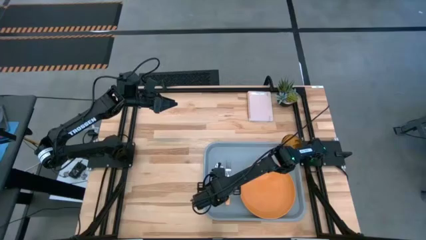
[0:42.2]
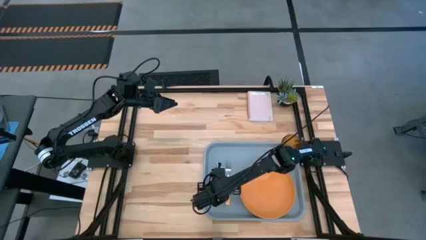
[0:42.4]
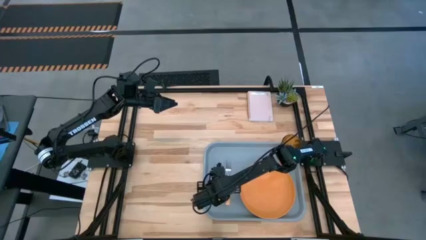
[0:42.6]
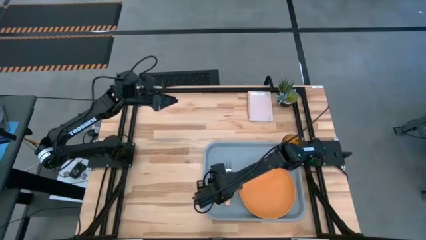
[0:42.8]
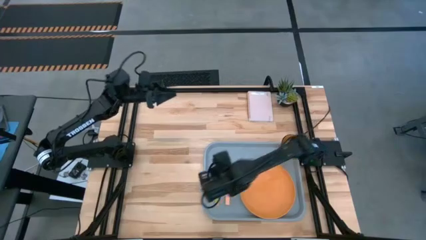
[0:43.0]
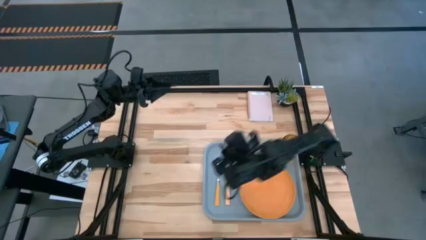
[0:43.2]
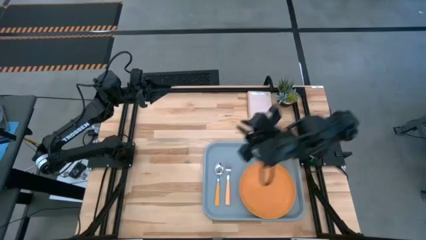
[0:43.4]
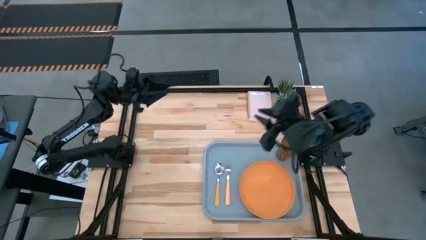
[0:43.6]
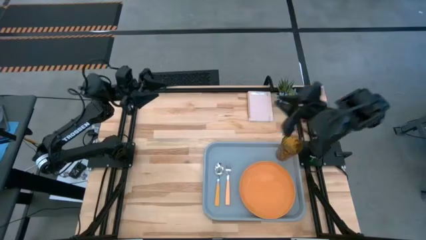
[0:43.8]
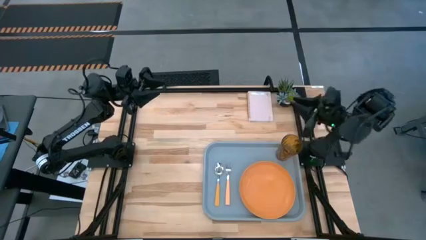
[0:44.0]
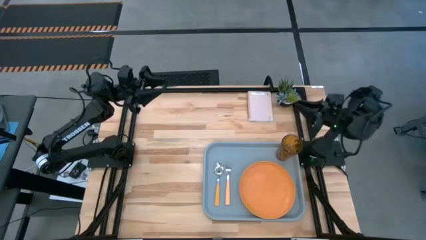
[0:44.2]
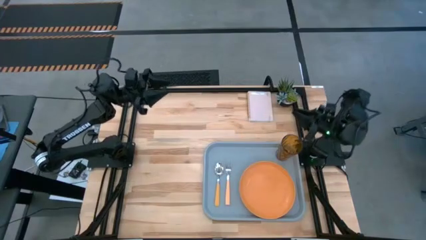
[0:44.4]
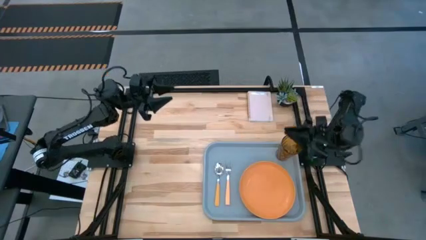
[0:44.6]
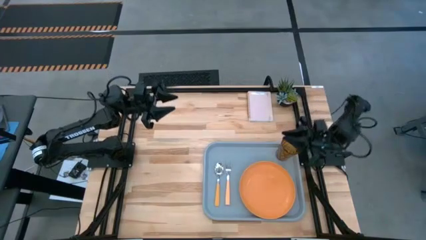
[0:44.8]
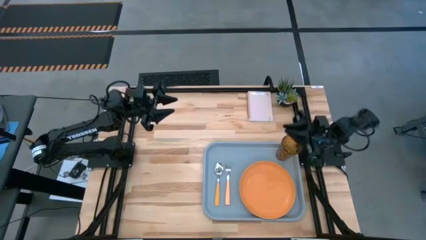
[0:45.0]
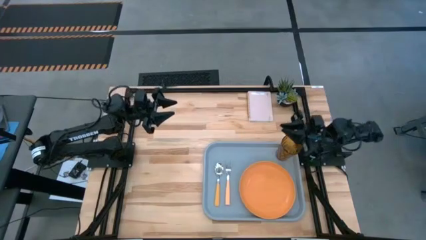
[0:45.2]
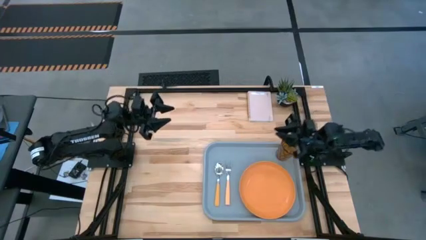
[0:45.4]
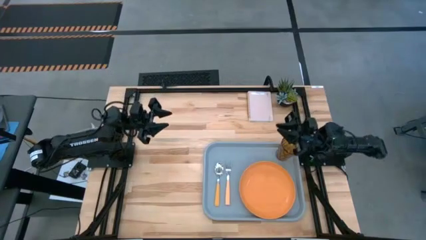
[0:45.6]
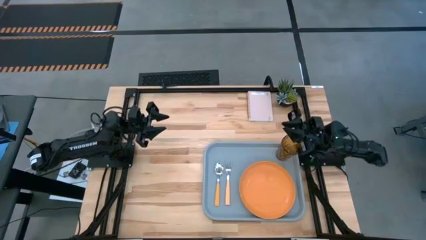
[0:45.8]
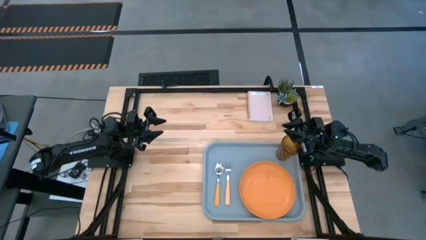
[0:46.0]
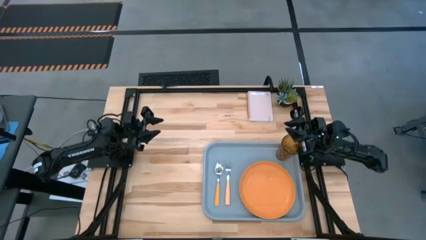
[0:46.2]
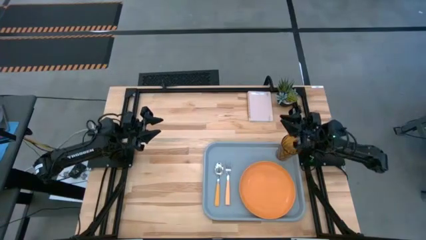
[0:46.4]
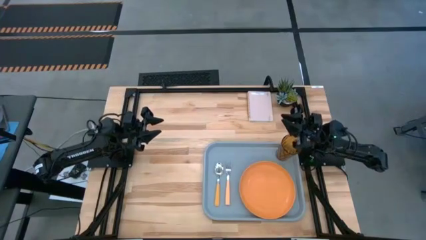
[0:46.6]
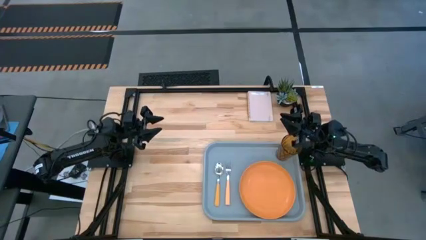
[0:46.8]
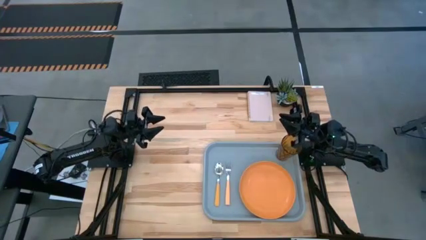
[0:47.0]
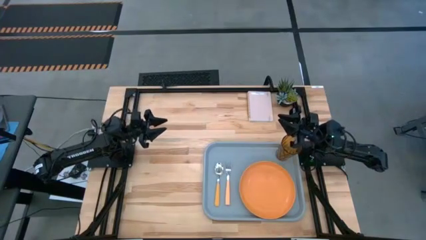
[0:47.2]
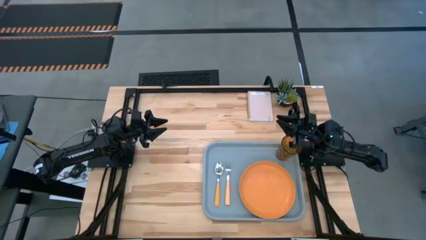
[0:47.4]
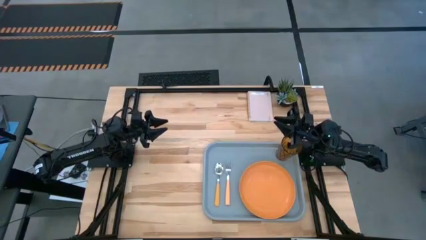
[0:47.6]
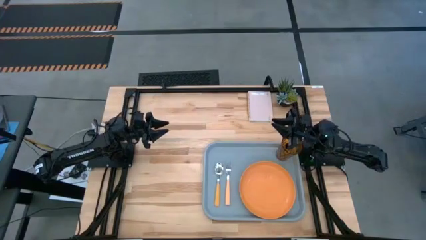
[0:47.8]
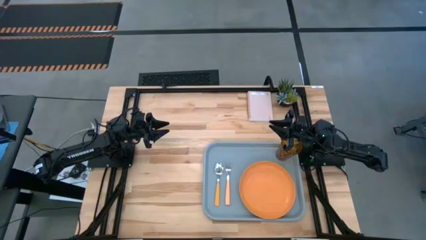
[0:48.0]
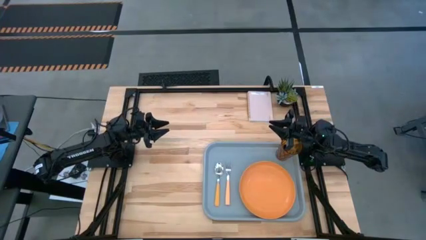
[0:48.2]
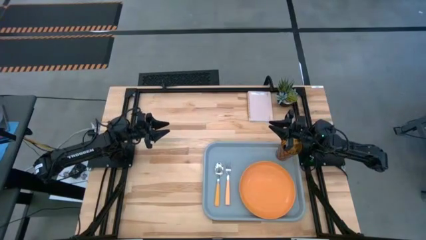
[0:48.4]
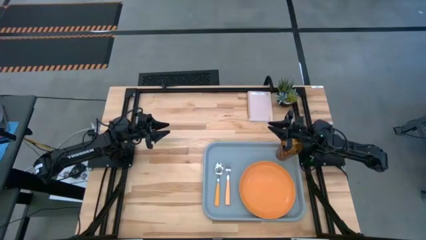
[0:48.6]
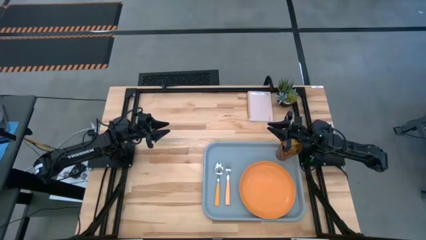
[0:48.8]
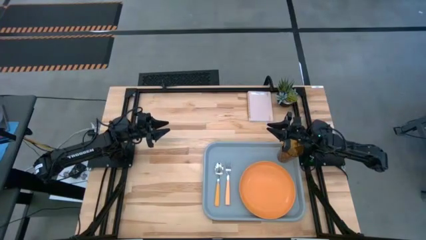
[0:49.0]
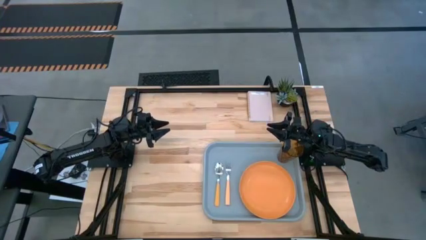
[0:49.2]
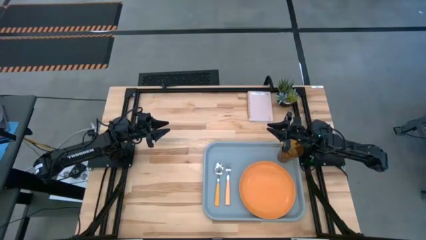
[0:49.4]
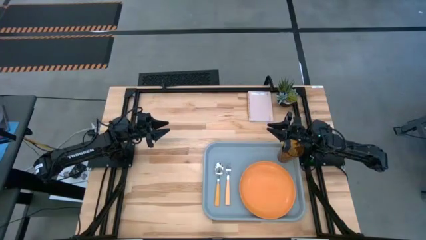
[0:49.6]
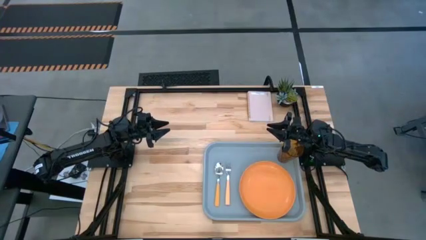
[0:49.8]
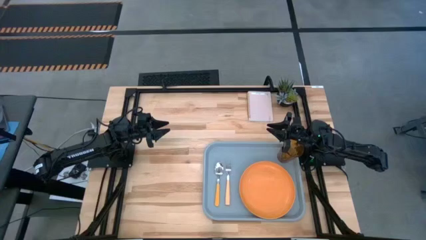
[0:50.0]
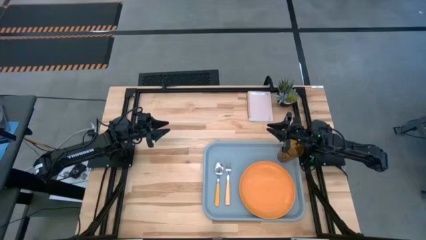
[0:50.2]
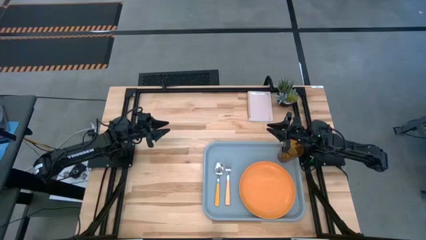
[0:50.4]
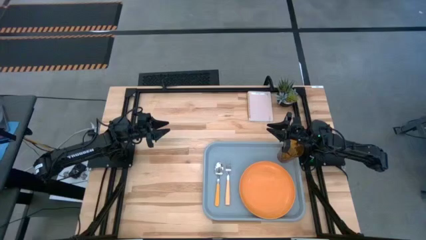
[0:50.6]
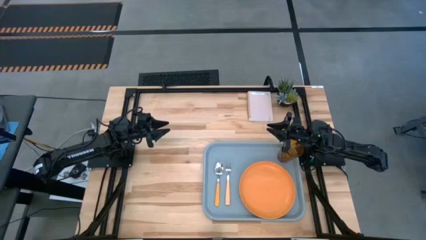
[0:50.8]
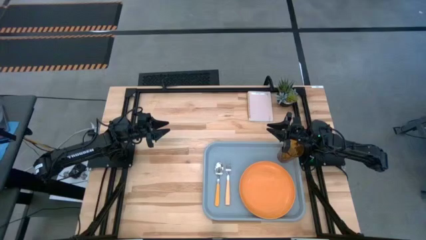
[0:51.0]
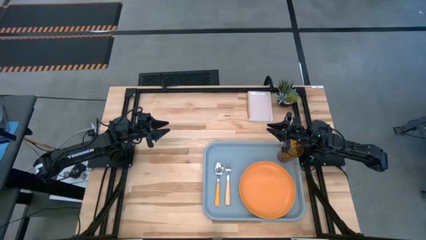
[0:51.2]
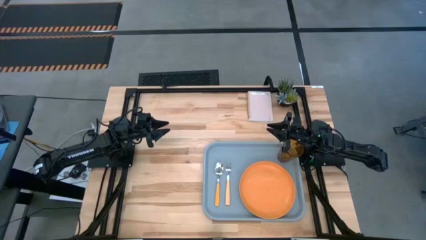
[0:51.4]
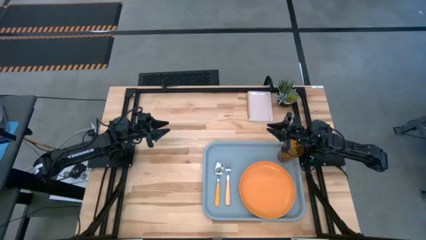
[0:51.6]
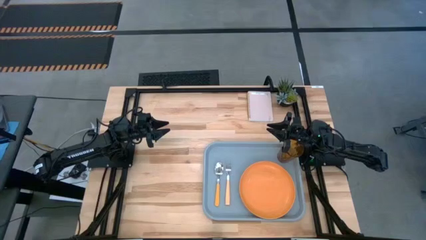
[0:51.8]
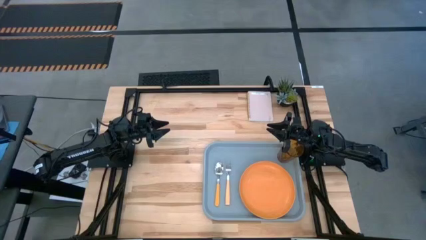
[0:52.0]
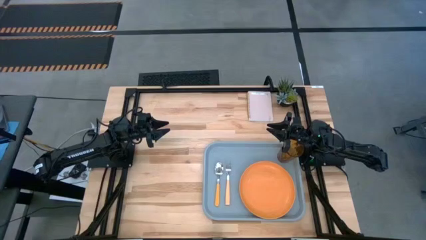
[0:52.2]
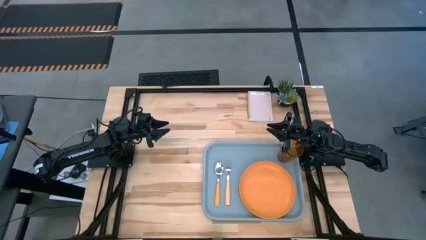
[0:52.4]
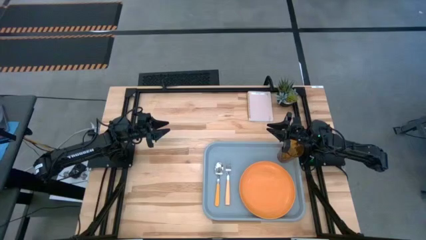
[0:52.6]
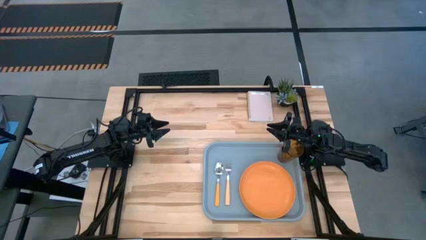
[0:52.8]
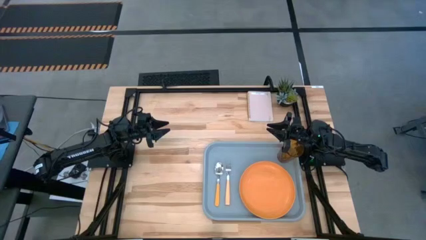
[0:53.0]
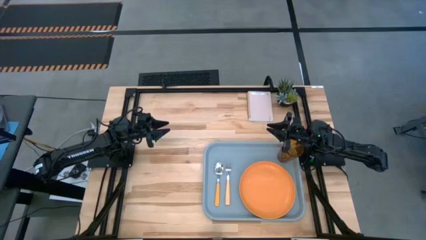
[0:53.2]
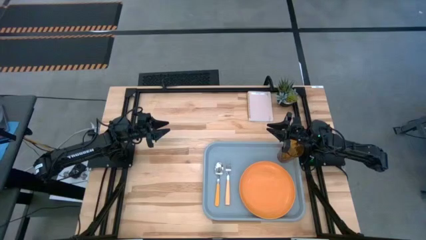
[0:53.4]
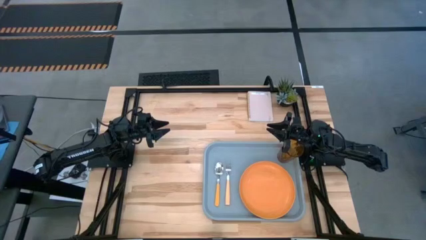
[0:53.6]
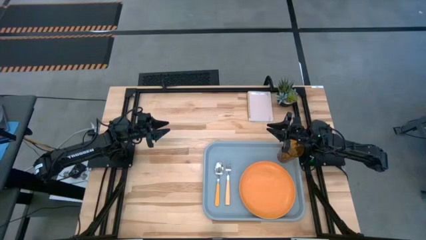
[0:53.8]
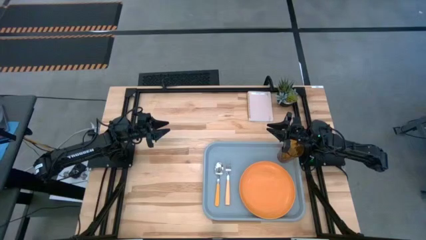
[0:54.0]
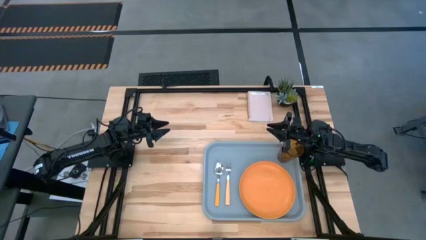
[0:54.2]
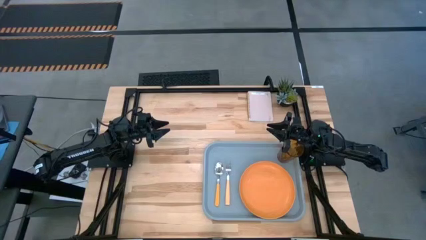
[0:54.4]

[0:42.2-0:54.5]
Task: Pick and place plate/cup/fork/spoon on tray
Return to Home Position
